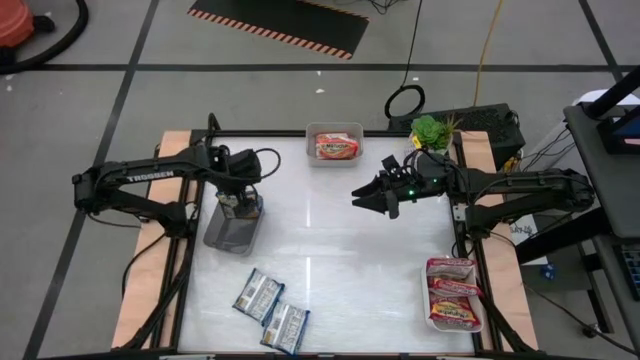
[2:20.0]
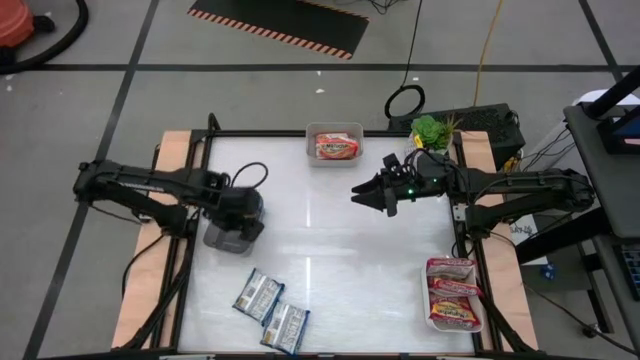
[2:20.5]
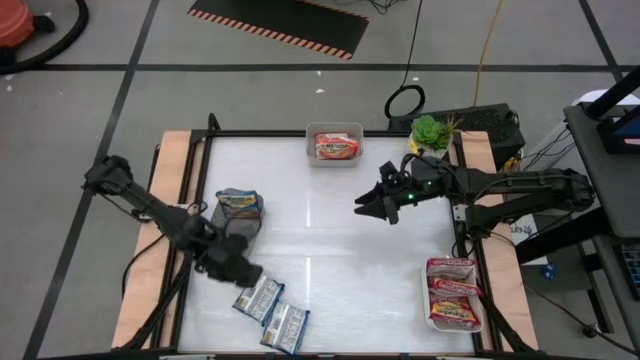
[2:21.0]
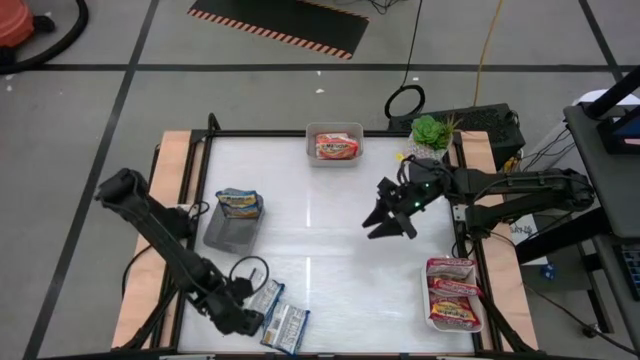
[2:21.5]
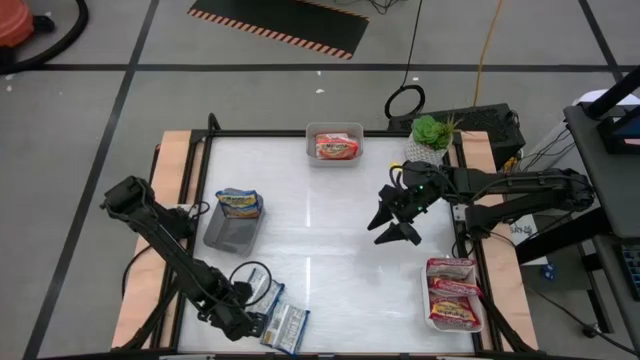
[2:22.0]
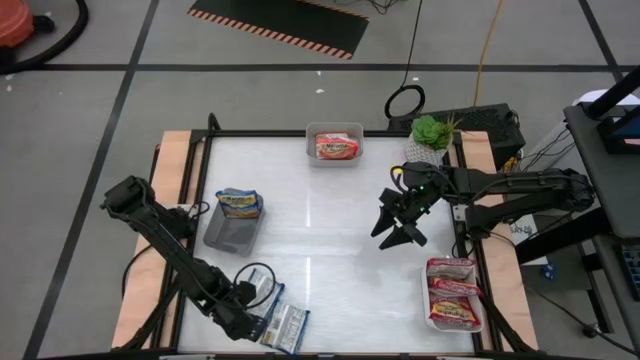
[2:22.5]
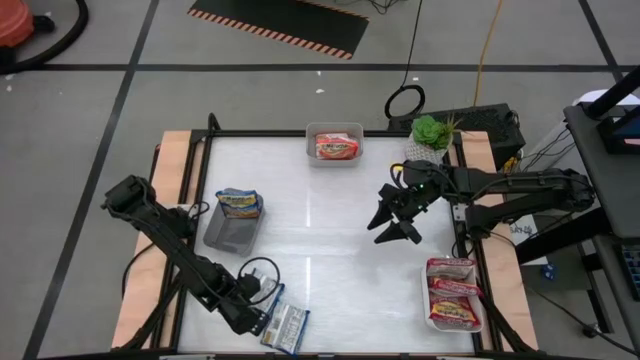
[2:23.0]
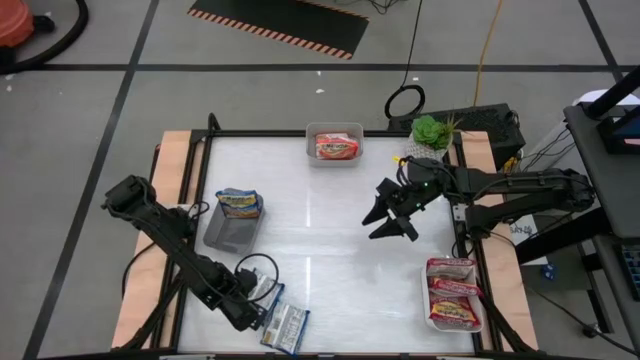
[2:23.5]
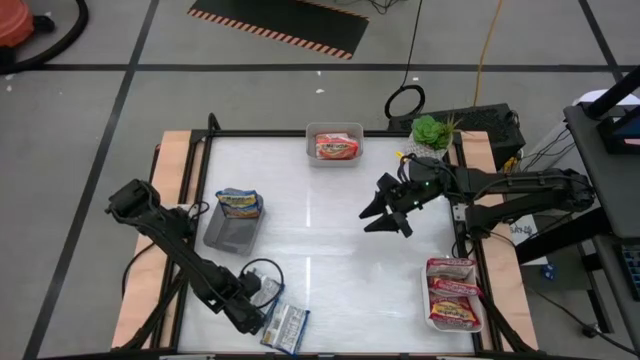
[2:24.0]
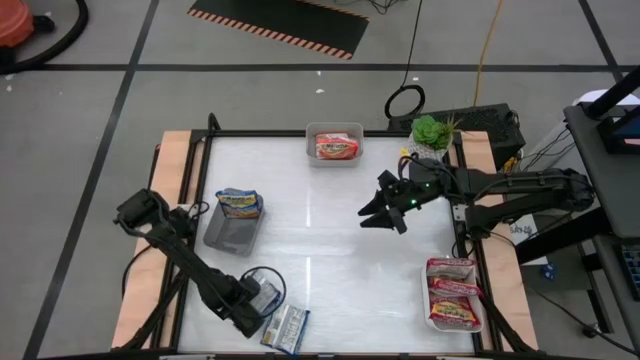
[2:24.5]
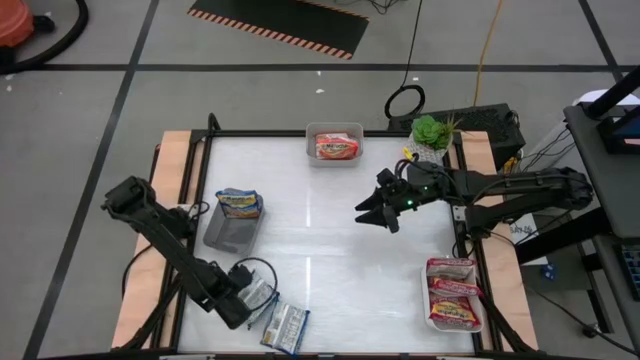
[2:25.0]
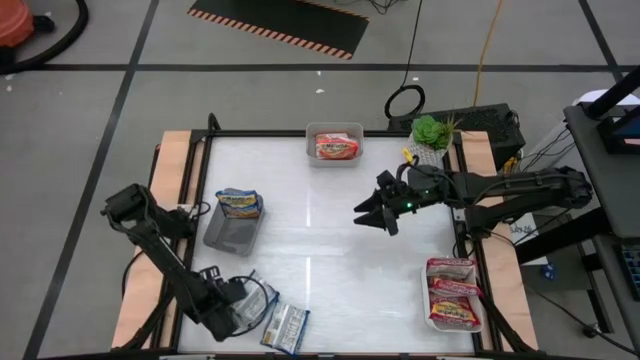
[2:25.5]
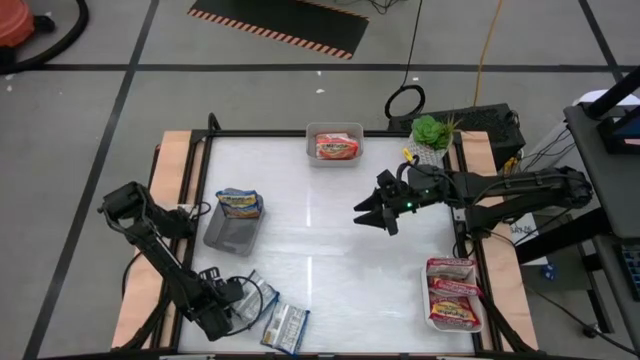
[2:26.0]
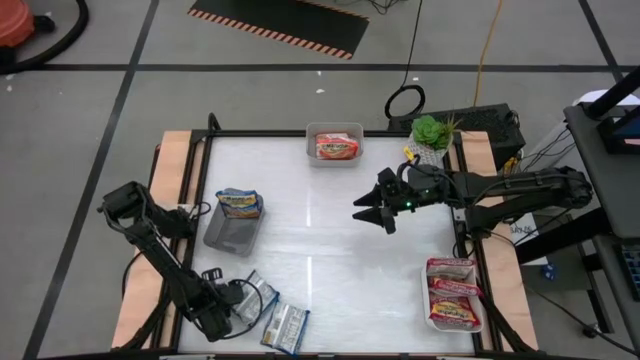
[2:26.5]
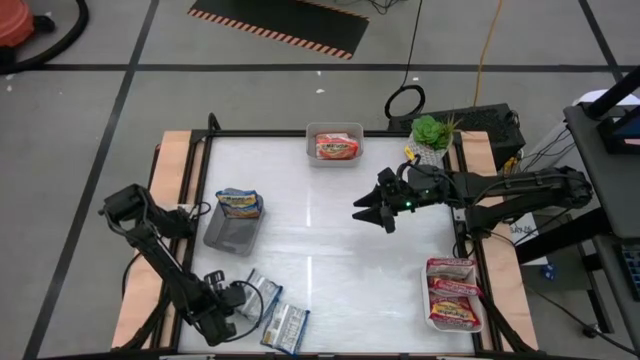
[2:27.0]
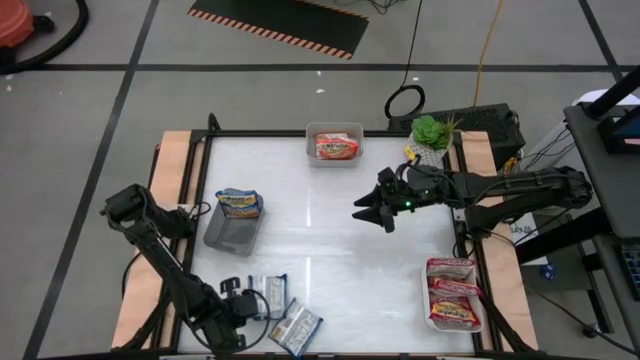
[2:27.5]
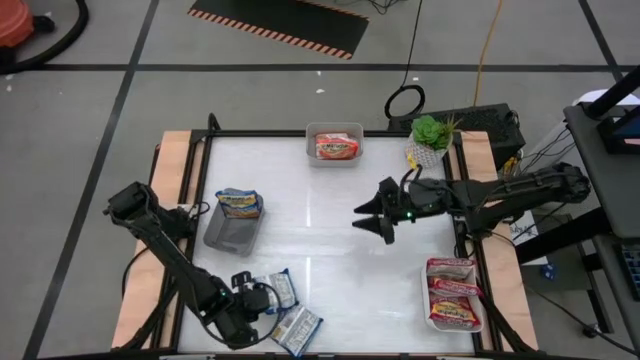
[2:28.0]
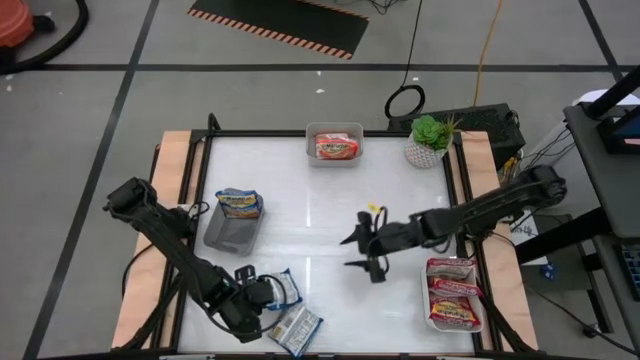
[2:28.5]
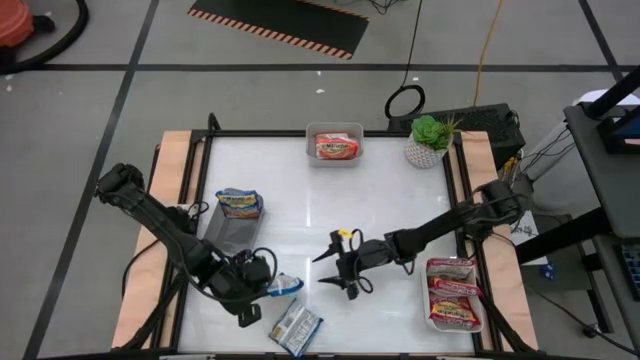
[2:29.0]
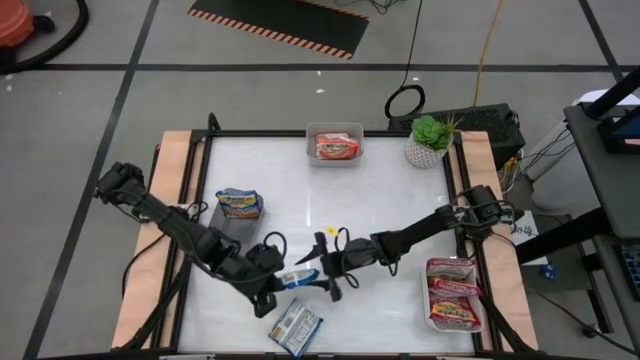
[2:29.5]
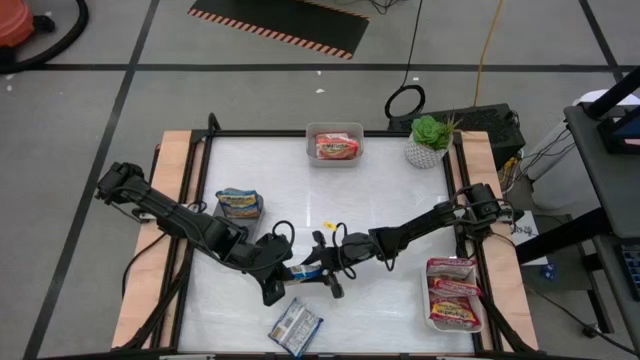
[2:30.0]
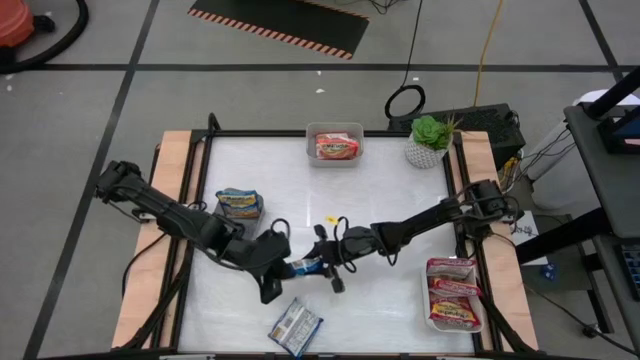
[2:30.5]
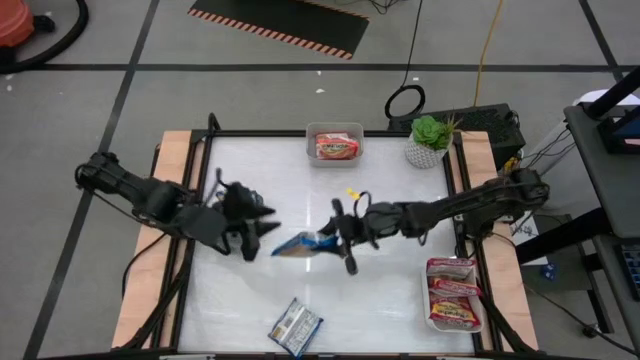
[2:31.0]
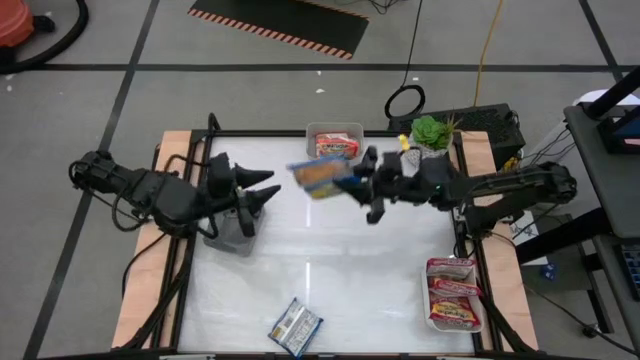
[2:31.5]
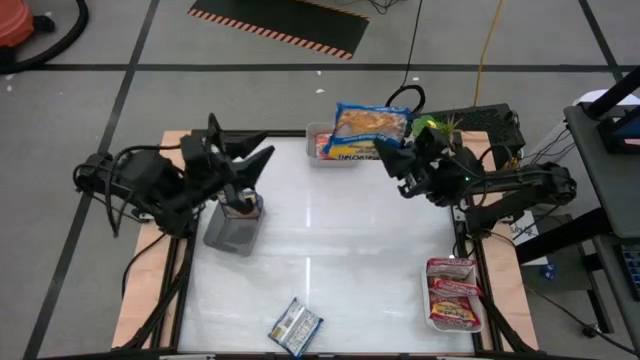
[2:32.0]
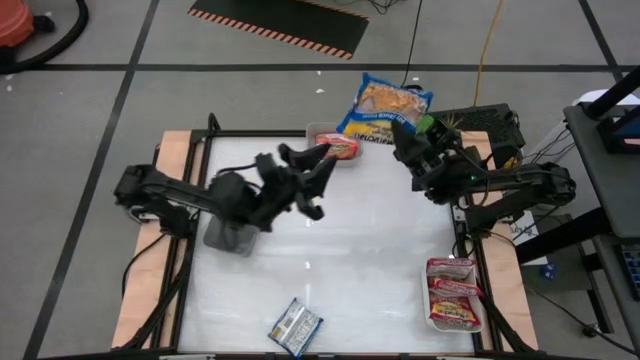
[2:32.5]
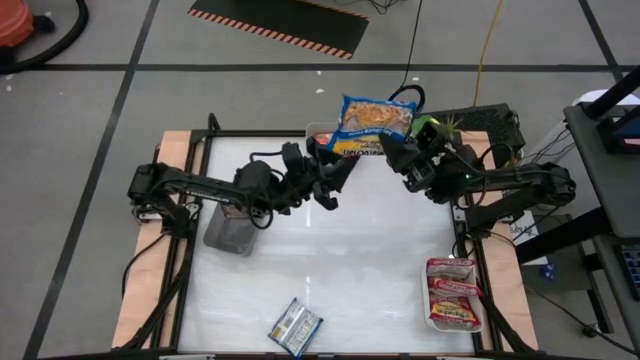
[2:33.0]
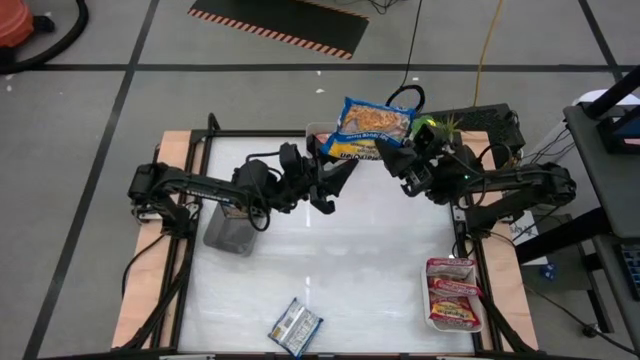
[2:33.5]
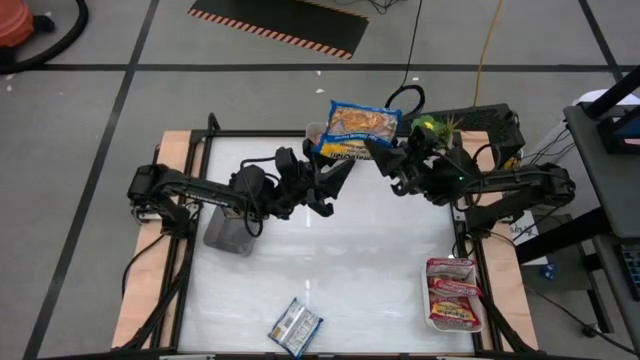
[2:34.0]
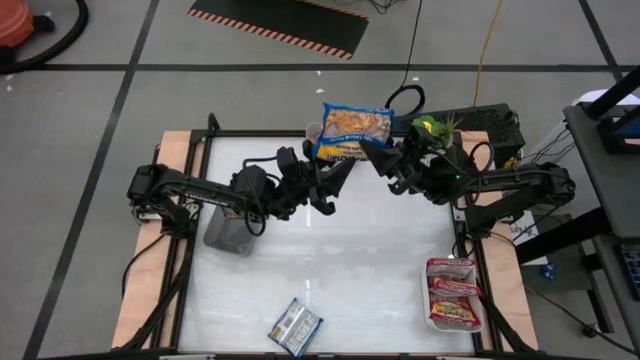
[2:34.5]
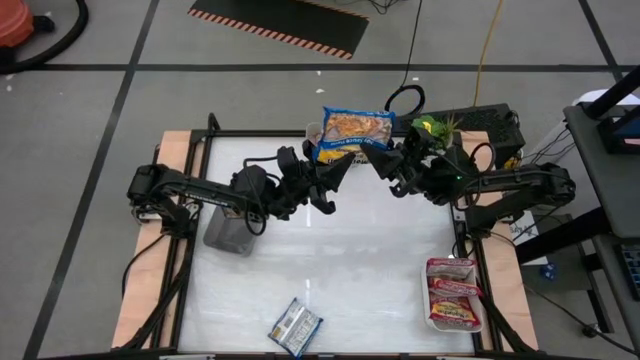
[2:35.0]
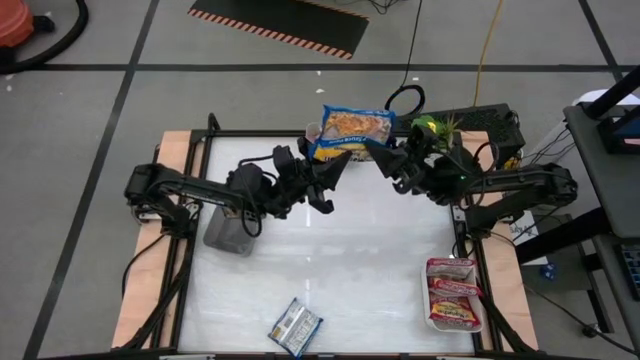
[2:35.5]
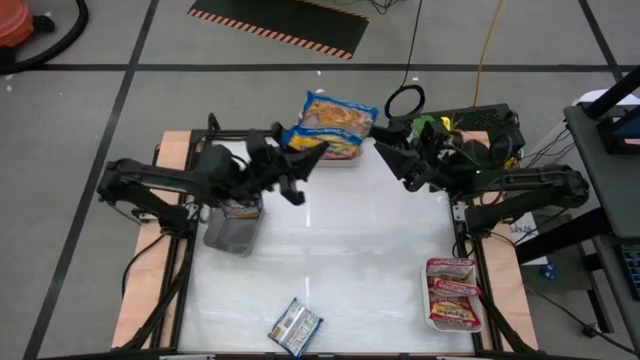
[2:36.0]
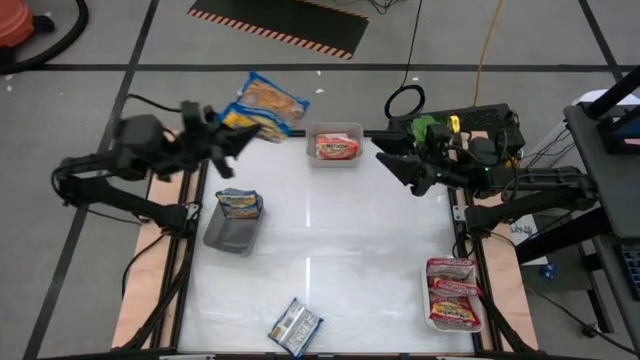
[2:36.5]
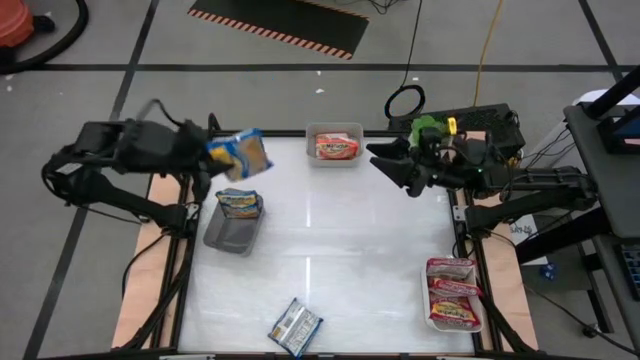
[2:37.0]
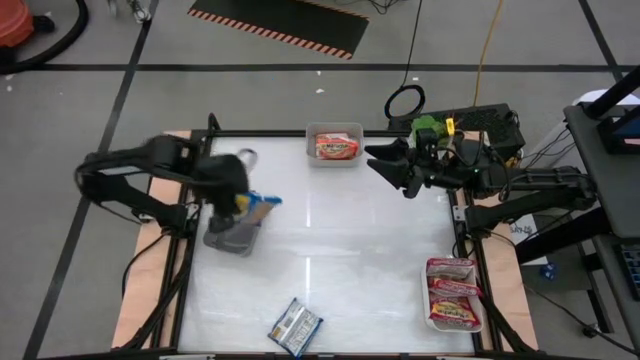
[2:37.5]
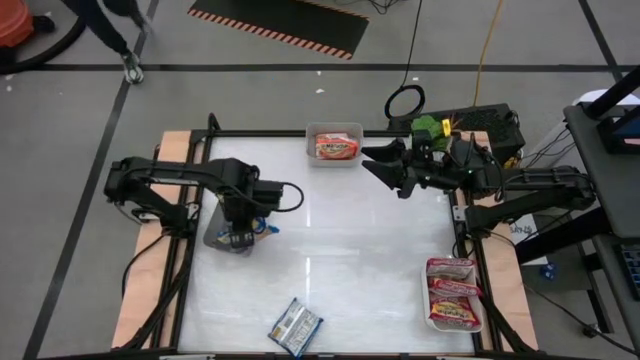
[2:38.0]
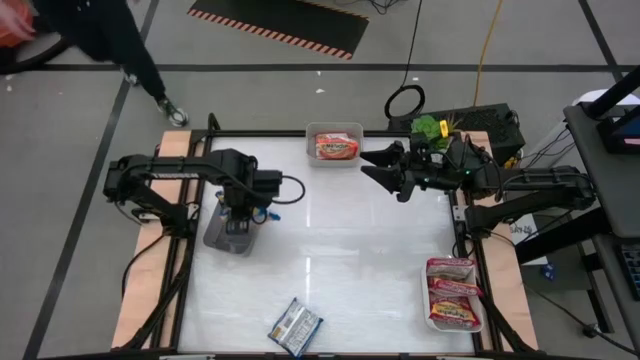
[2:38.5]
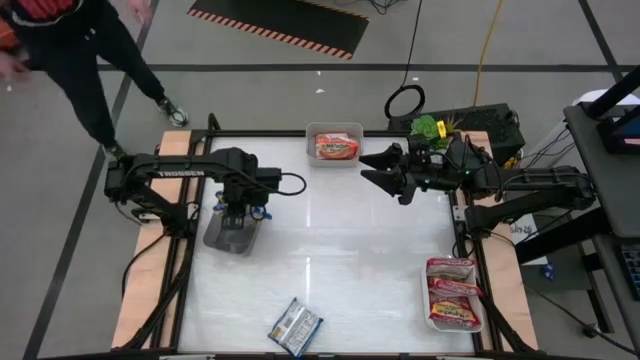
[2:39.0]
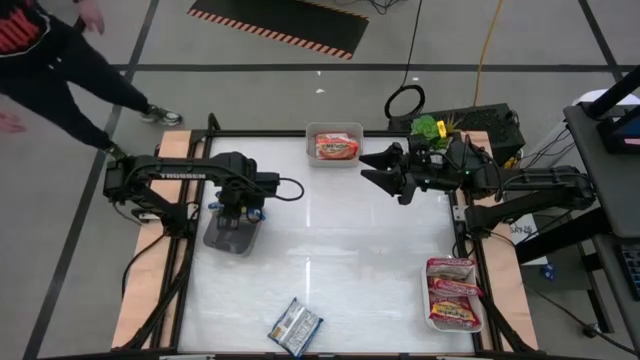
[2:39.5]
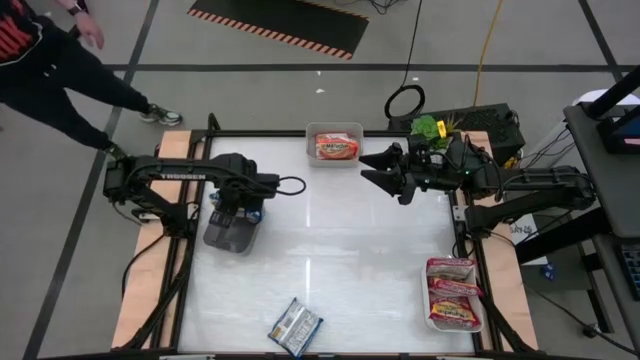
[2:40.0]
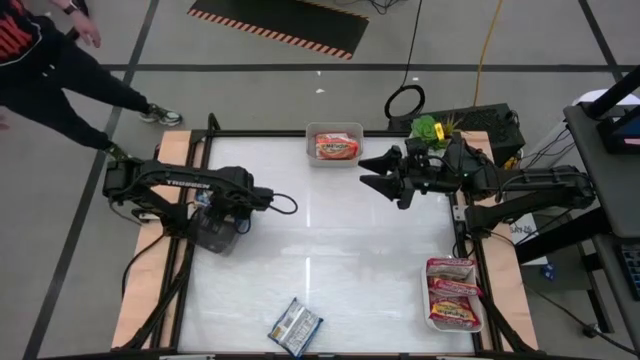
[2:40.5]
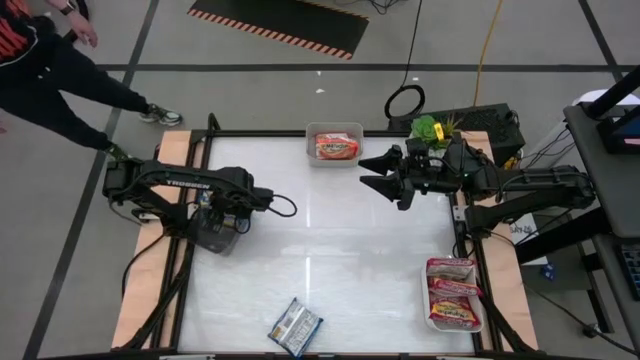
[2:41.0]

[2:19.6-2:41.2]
Task: Sort Maruchan noodles
Put the left blue noodle pack into the black bin

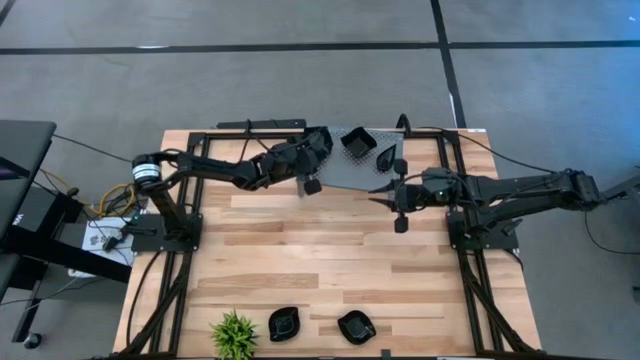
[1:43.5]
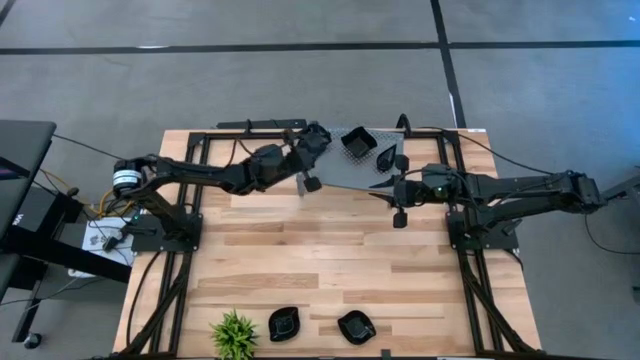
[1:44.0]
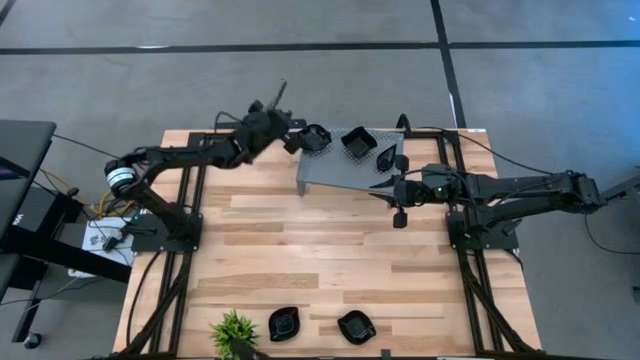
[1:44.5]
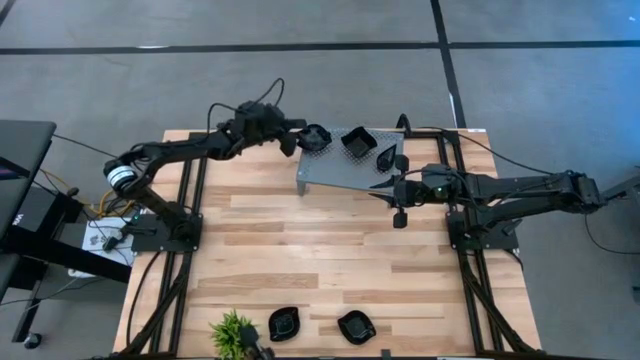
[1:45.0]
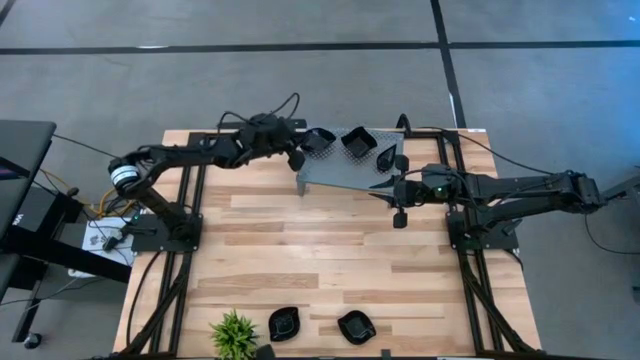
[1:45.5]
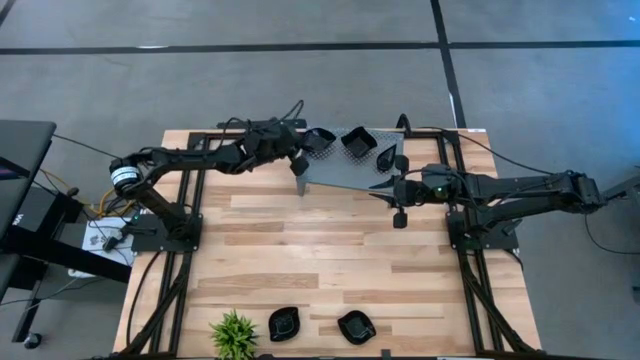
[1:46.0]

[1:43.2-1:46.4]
Task: Pick & Place Mini shaped plates
Stack the black leaf-shaped plate on the other black leaf-shaped plates on the shelf
